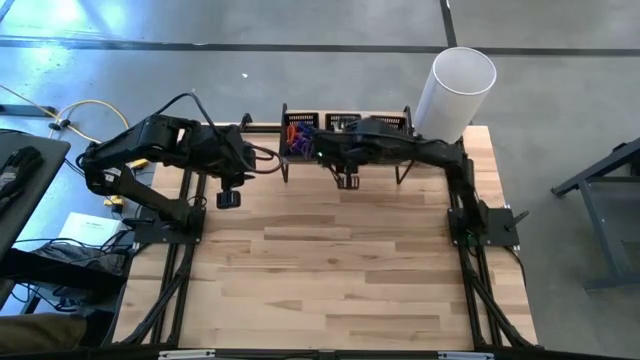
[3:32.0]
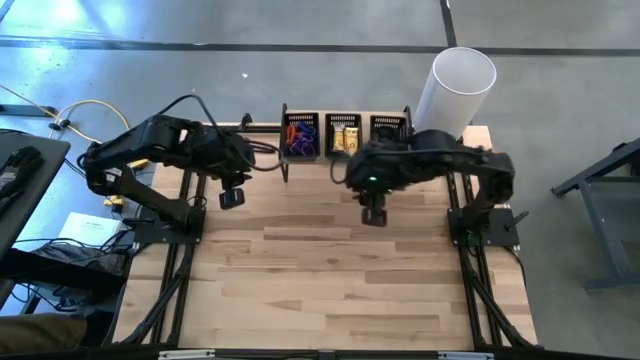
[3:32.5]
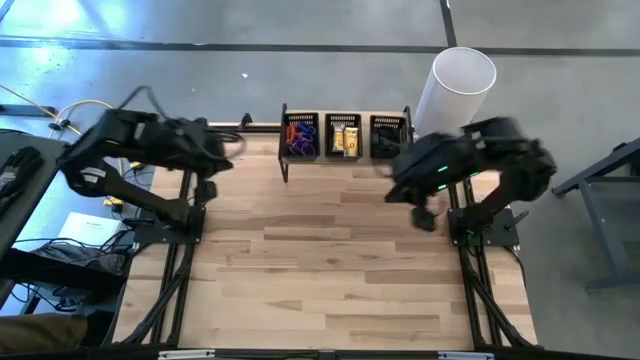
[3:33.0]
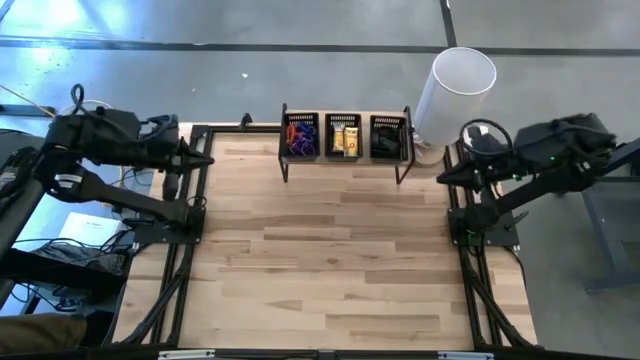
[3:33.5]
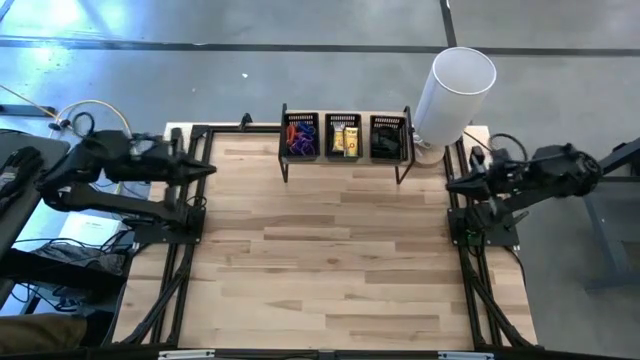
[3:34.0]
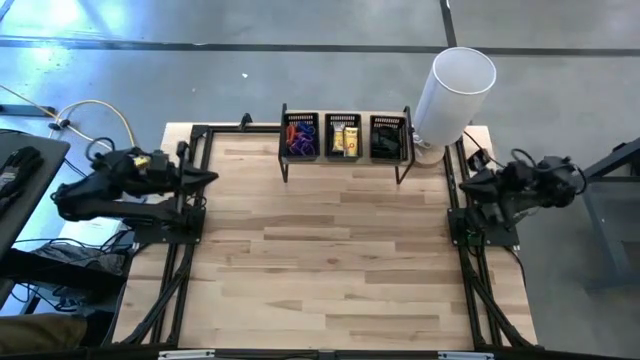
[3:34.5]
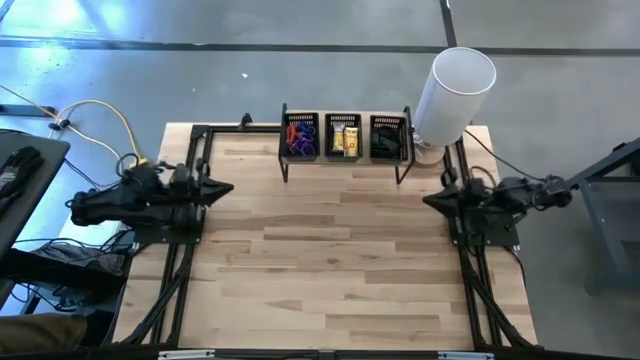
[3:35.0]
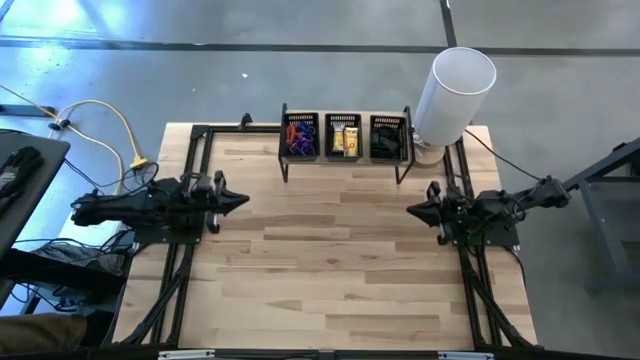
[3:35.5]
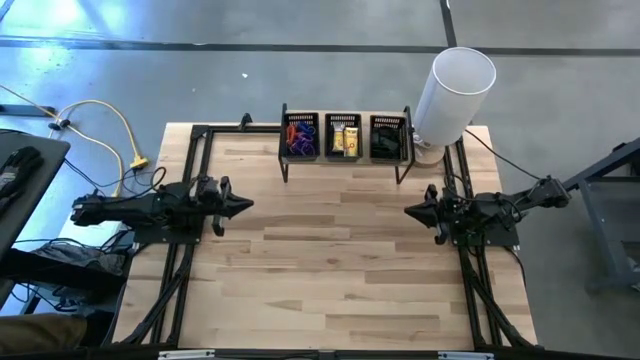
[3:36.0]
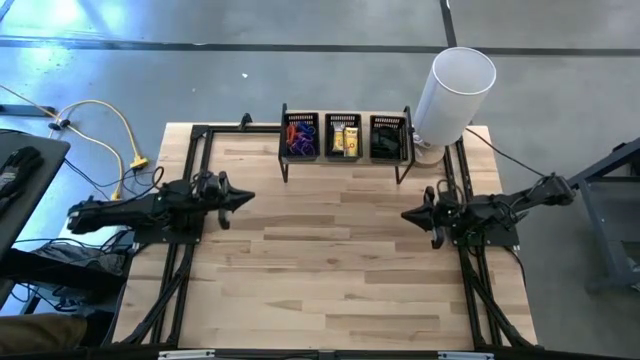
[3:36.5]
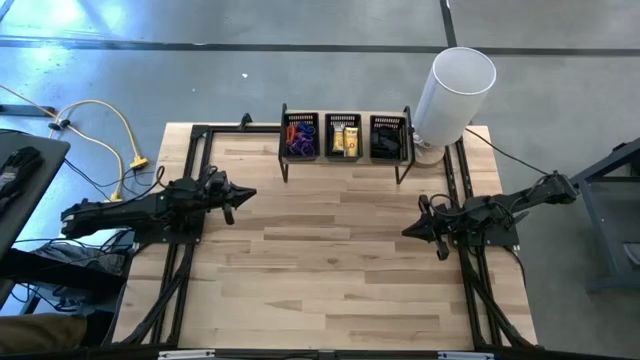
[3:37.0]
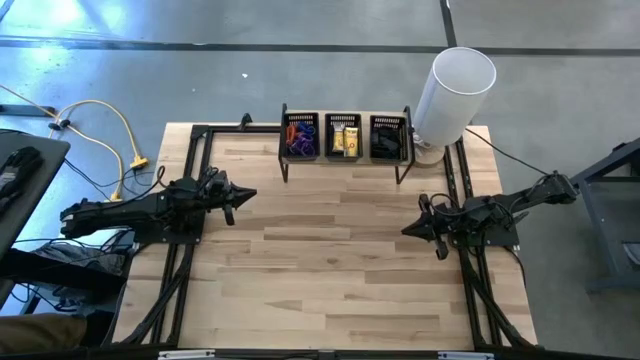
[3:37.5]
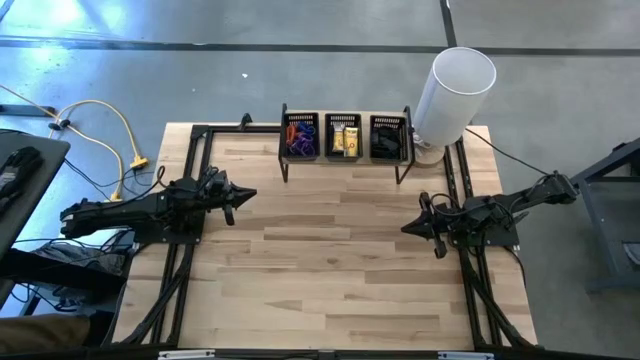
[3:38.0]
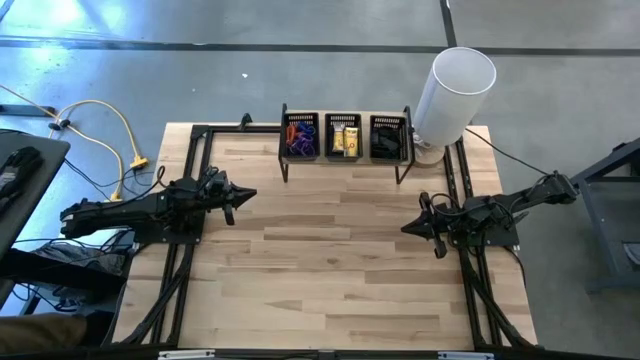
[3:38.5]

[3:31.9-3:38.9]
Task: Pick & Place Office Desk Supplies
Return to Home Position

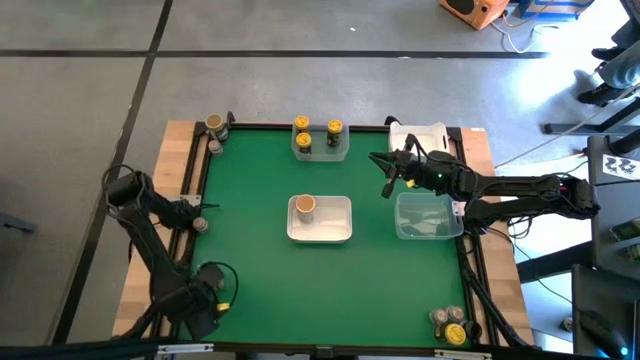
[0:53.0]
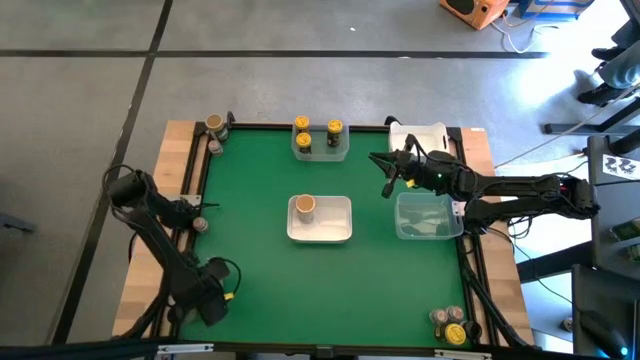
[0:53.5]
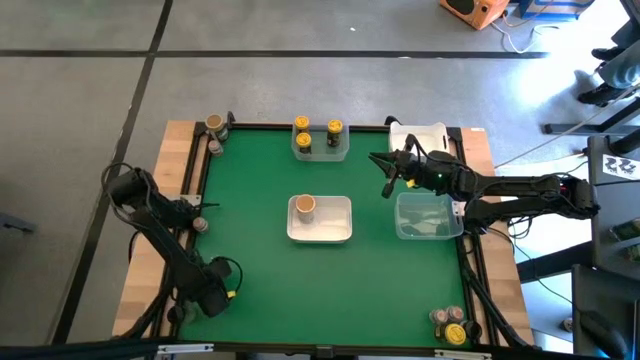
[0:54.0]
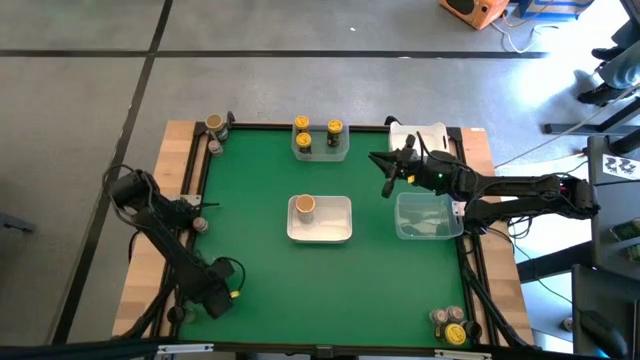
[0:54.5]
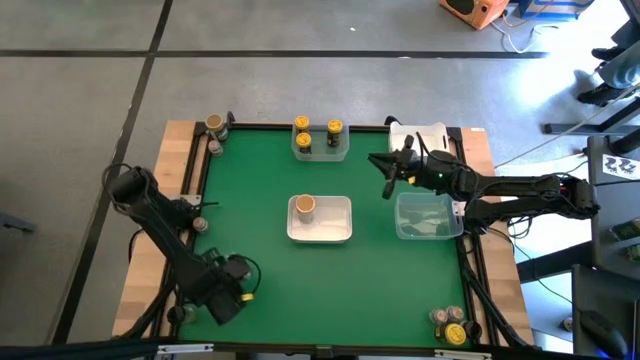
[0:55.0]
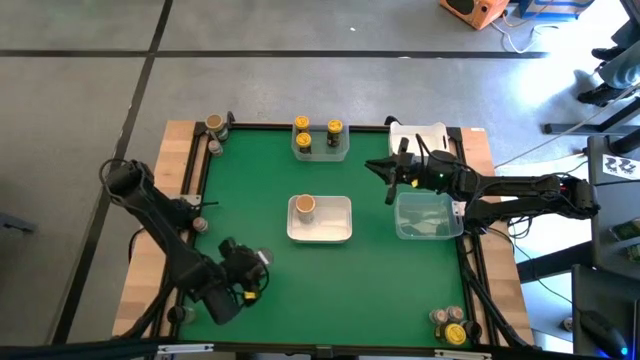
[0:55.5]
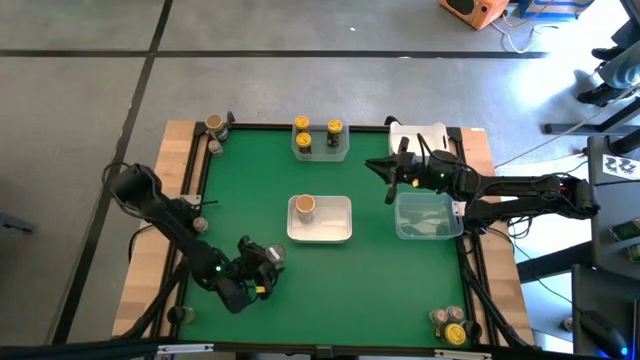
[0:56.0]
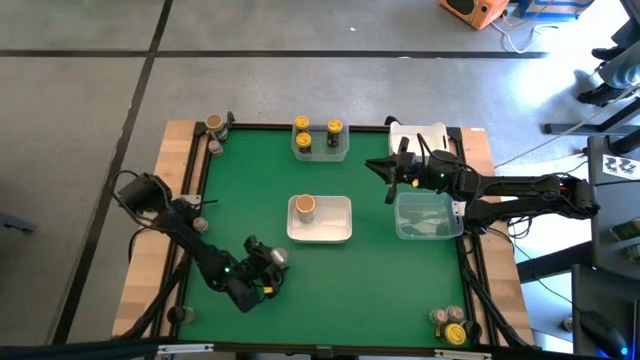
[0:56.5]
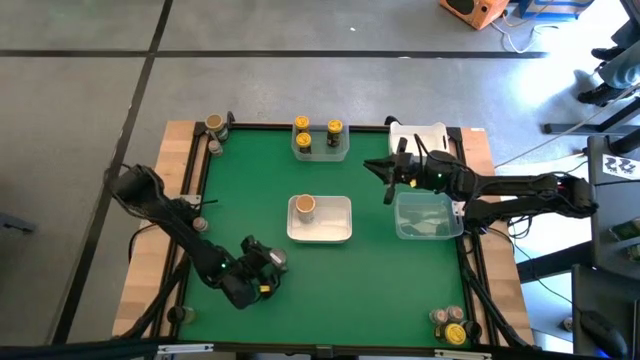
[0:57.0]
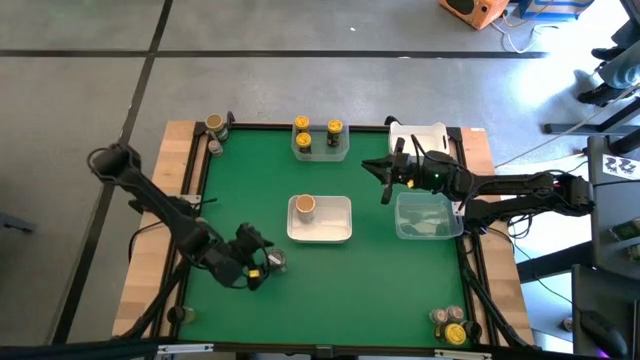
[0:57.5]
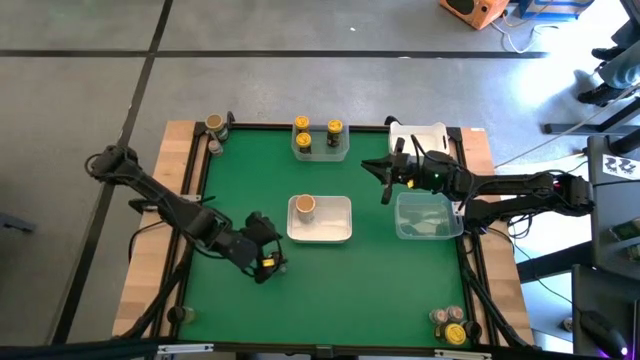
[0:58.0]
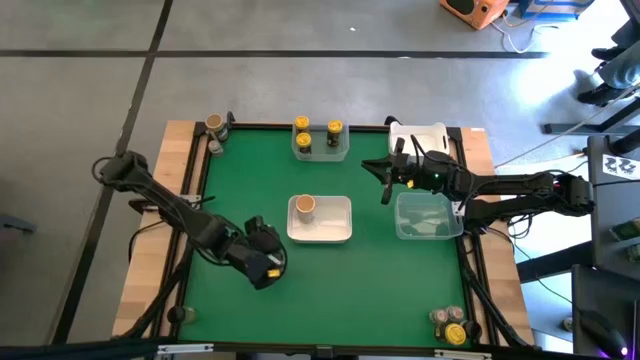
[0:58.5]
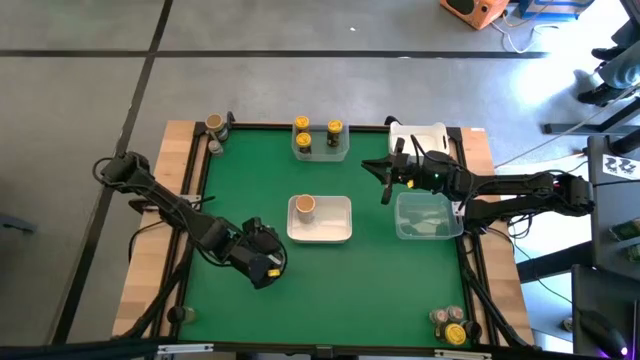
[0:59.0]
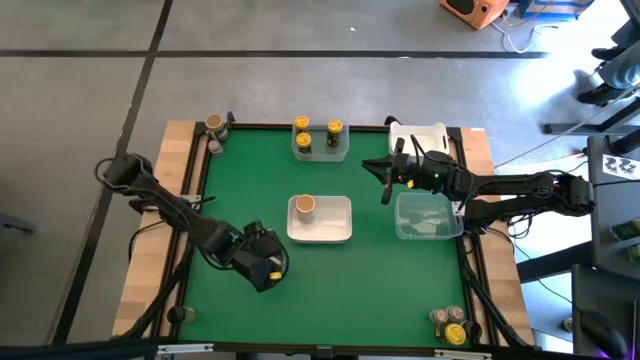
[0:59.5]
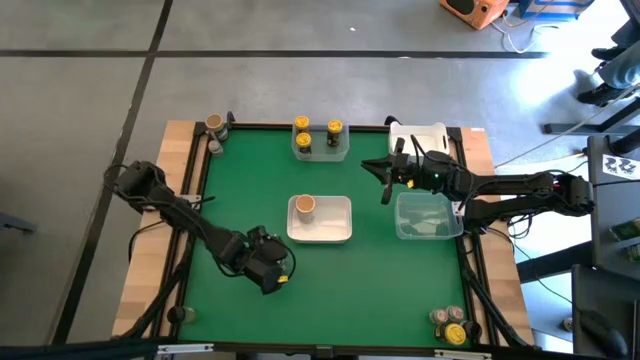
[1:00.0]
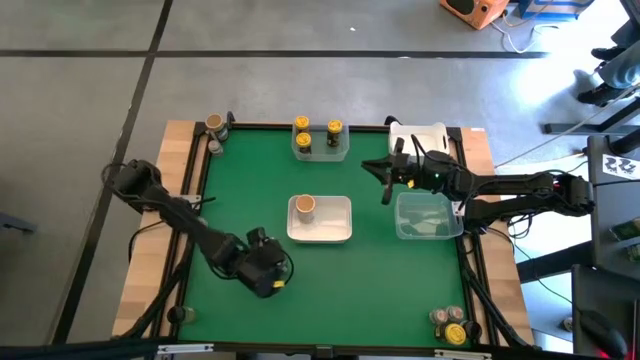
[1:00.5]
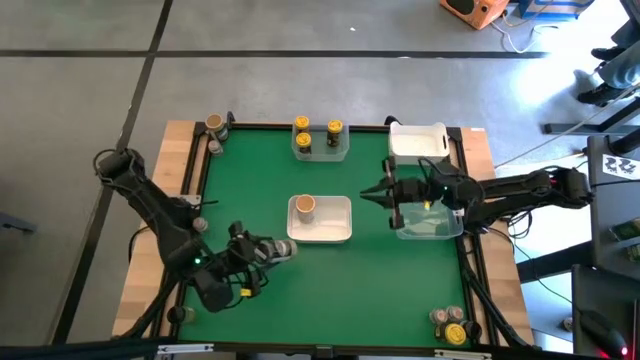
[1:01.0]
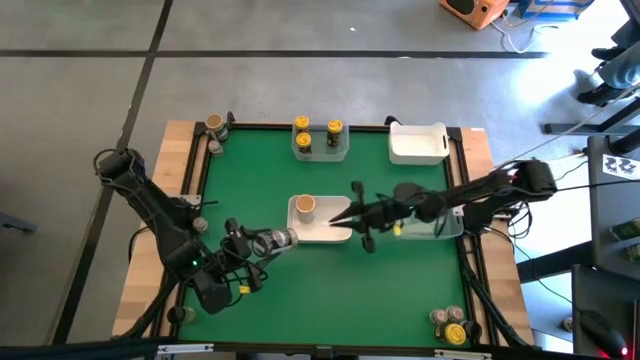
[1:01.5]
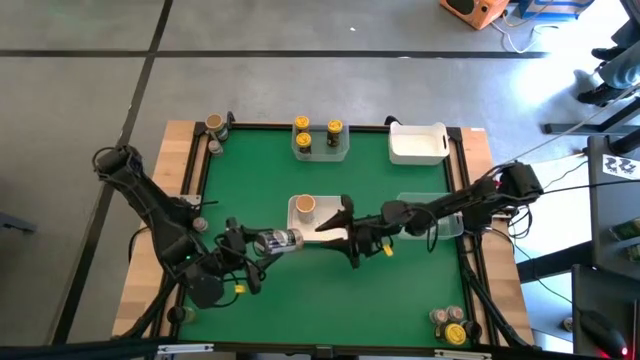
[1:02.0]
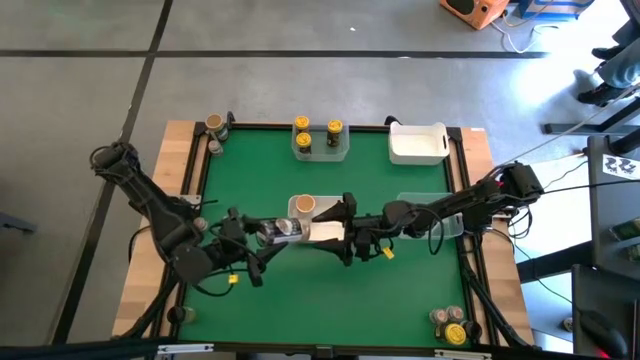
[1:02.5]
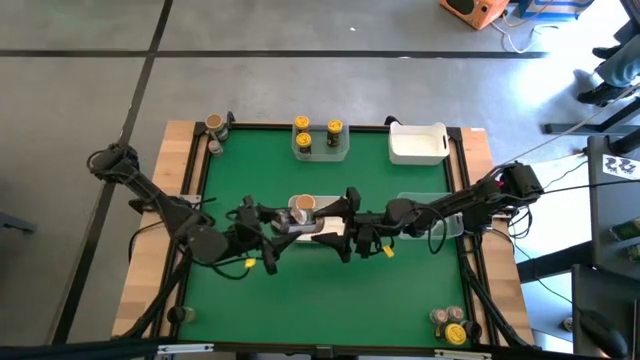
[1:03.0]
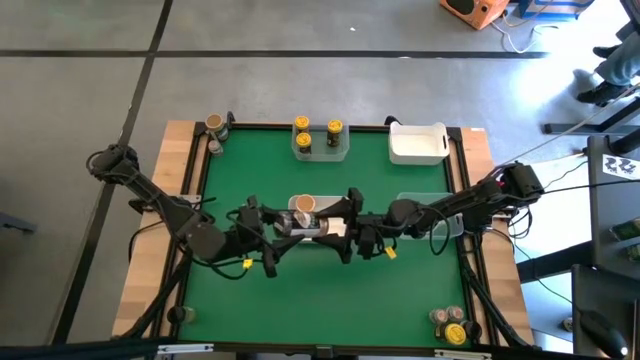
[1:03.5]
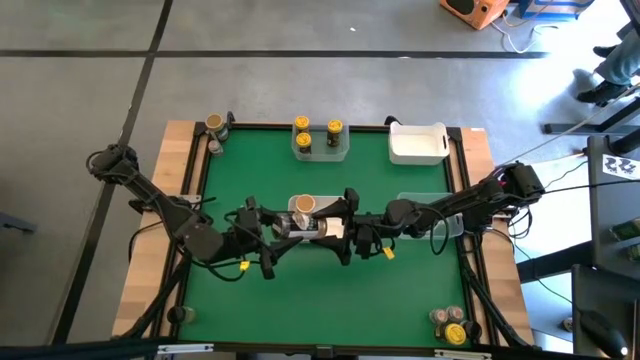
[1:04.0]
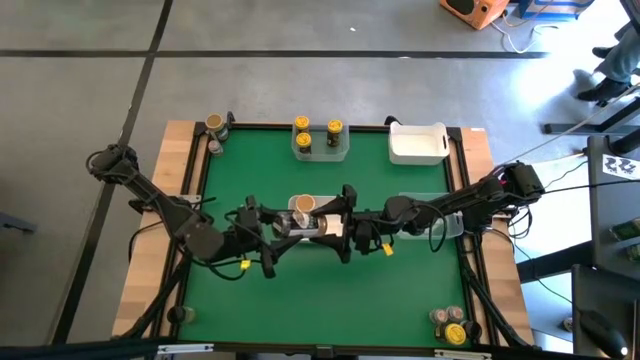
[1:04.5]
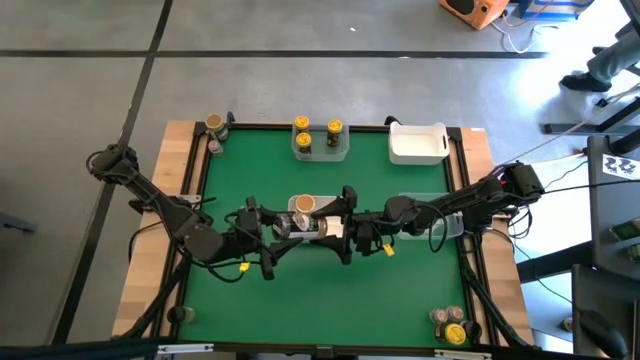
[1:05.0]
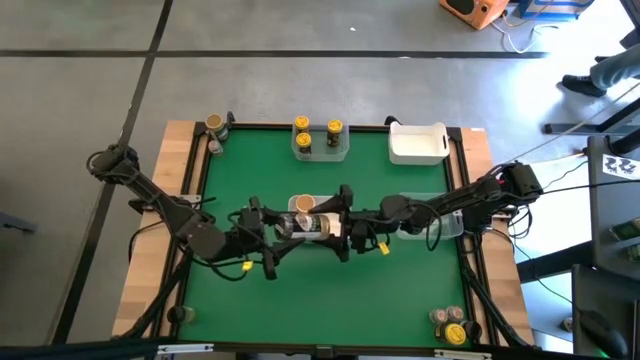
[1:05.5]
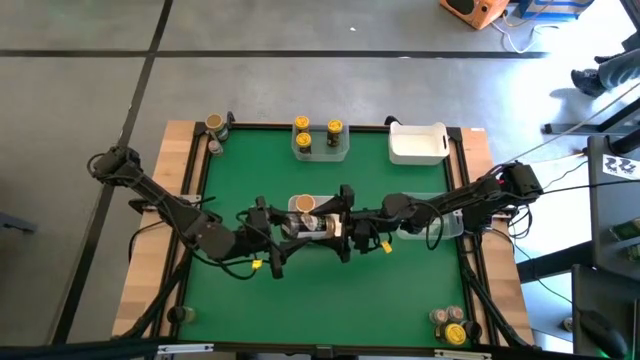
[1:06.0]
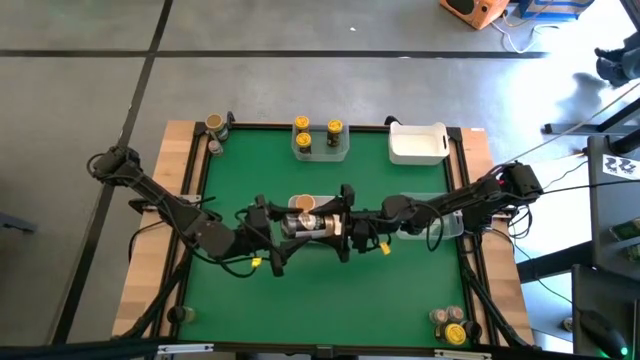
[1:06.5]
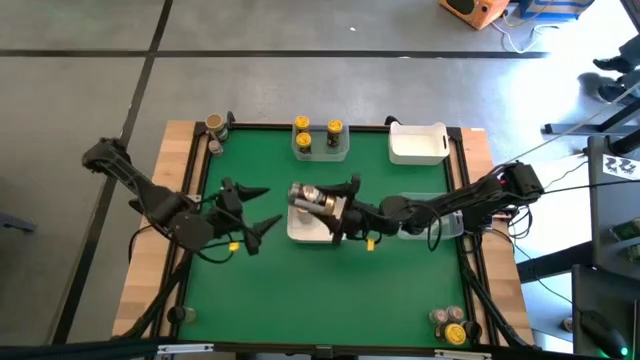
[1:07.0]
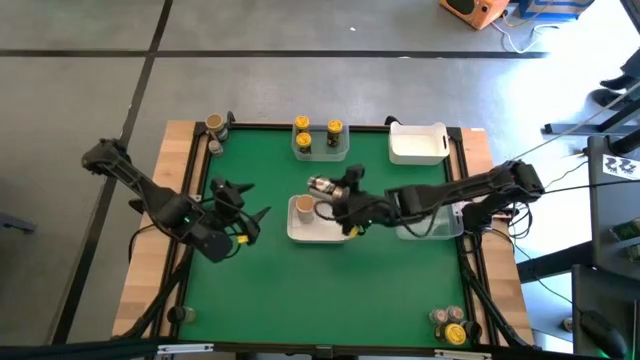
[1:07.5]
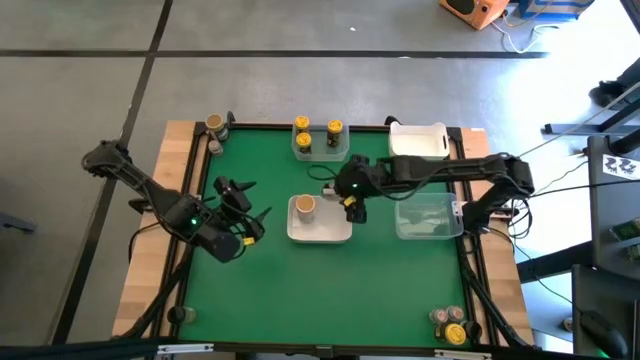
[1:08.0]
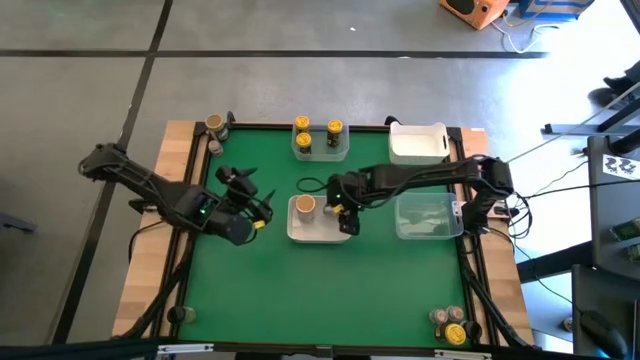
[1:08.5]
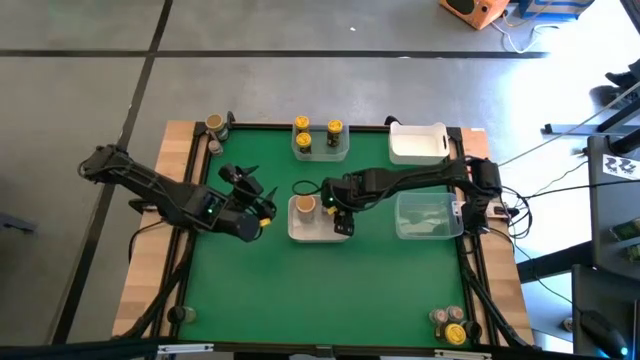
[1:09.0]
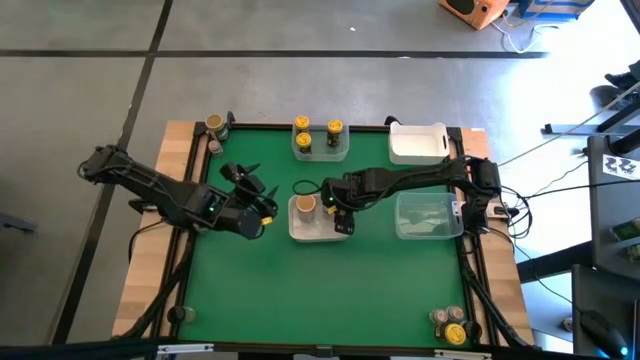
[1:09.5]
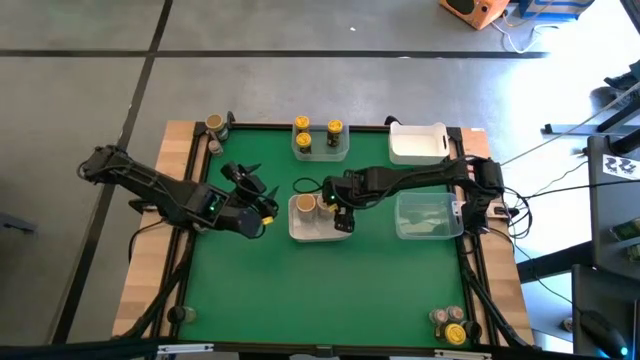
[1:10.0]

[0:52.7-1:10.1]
Task: Sort spices by type
Put the bottom gold seasoning bottle into the bottom white bin
